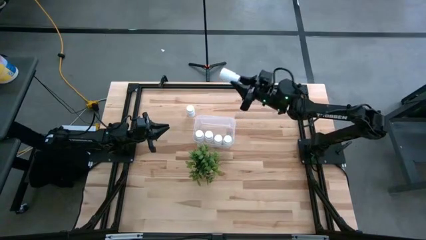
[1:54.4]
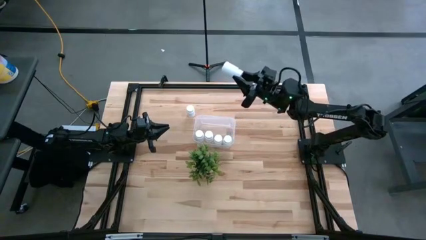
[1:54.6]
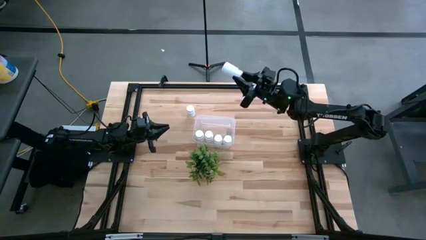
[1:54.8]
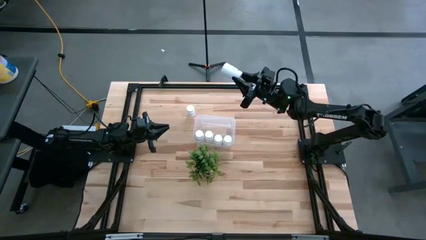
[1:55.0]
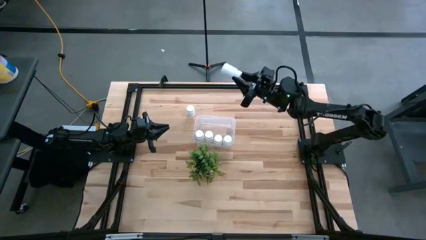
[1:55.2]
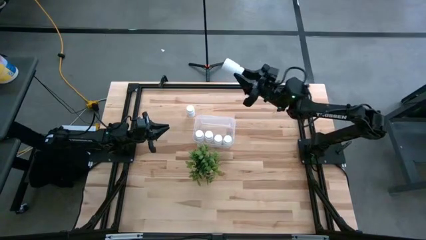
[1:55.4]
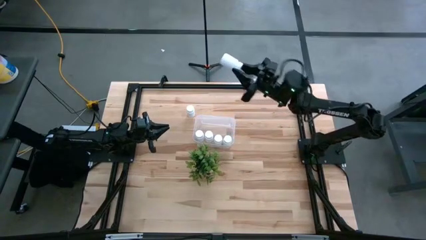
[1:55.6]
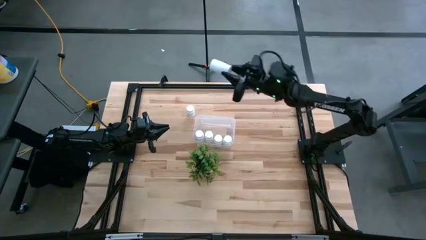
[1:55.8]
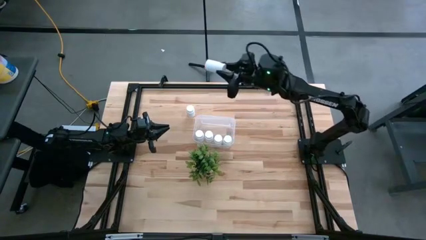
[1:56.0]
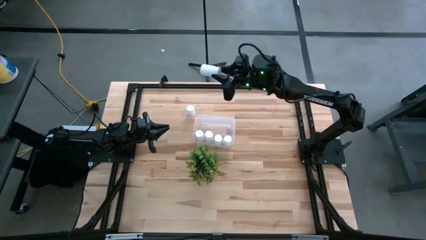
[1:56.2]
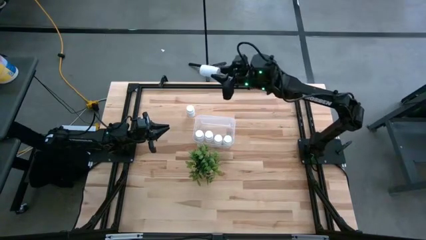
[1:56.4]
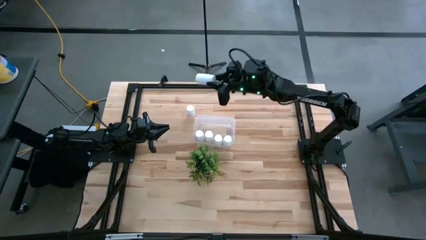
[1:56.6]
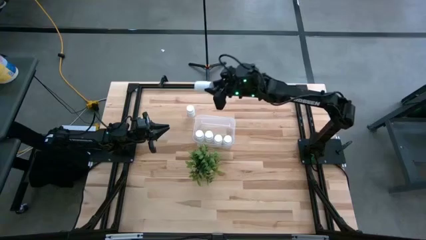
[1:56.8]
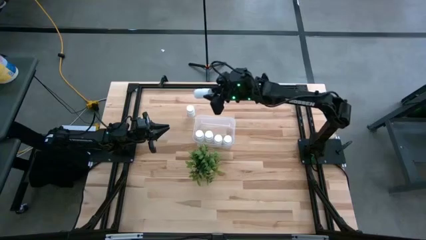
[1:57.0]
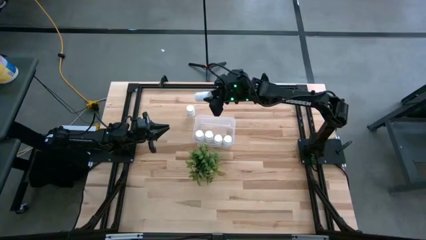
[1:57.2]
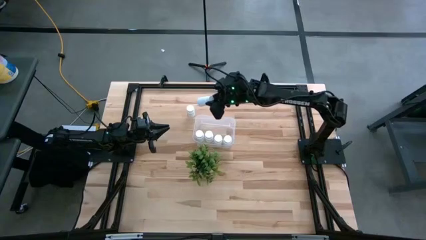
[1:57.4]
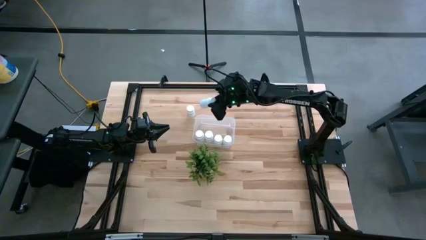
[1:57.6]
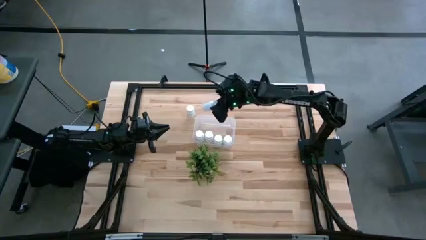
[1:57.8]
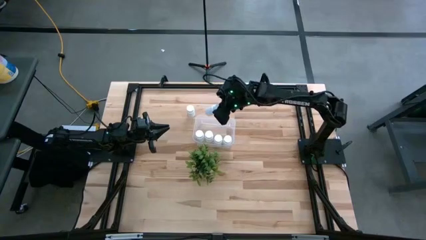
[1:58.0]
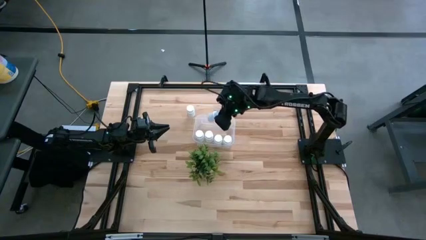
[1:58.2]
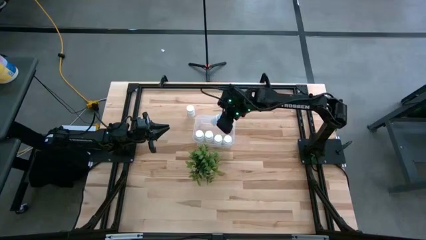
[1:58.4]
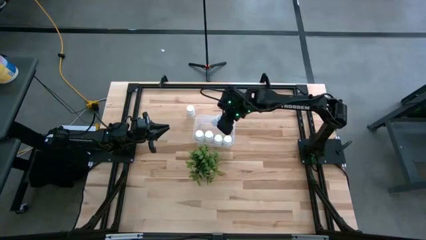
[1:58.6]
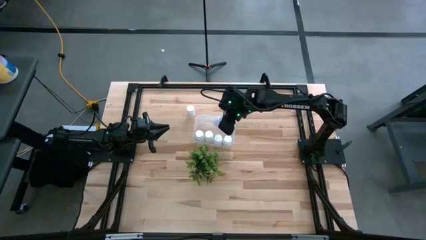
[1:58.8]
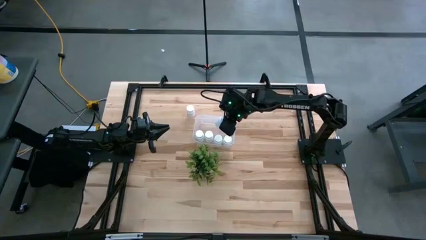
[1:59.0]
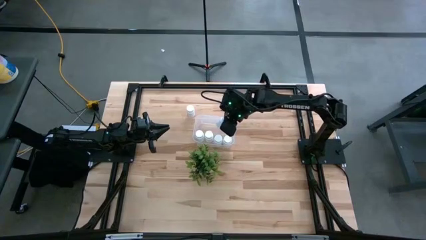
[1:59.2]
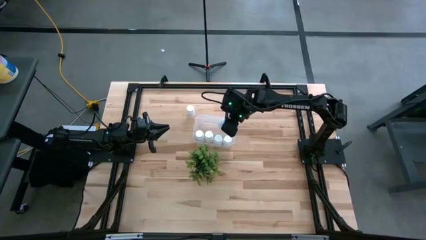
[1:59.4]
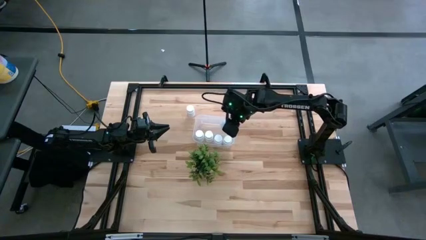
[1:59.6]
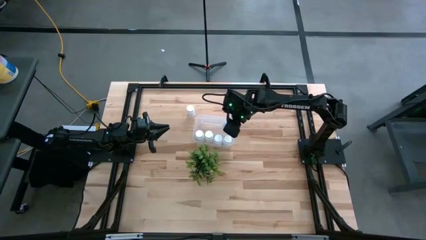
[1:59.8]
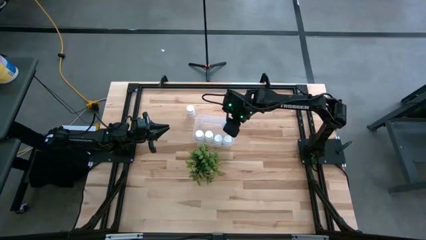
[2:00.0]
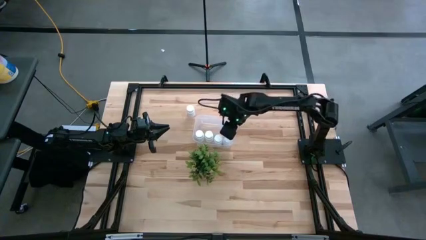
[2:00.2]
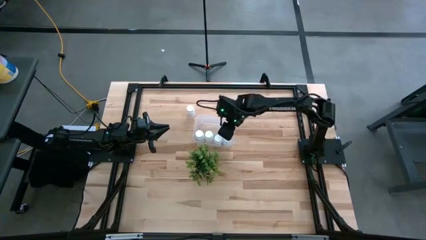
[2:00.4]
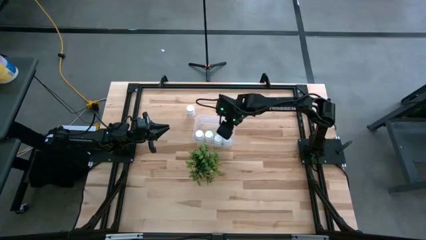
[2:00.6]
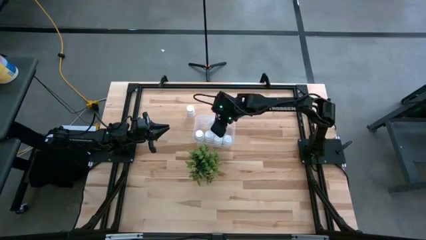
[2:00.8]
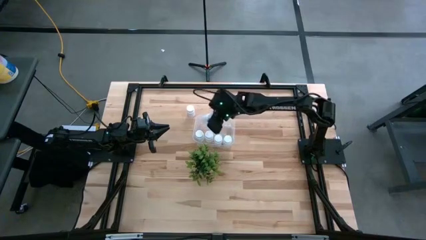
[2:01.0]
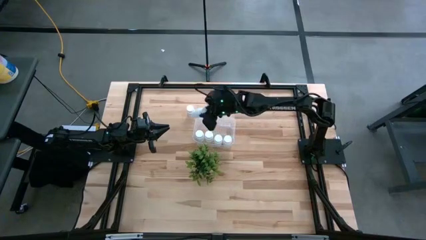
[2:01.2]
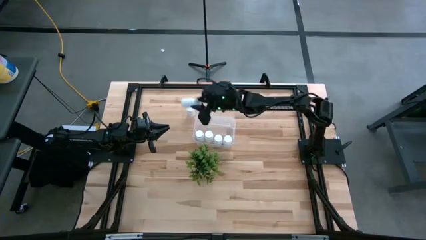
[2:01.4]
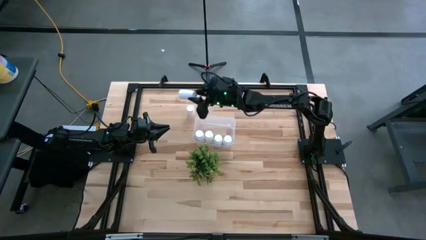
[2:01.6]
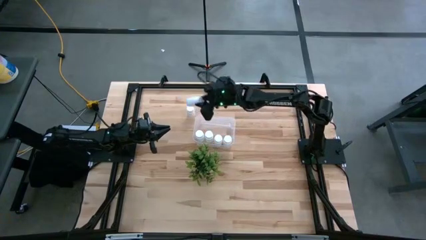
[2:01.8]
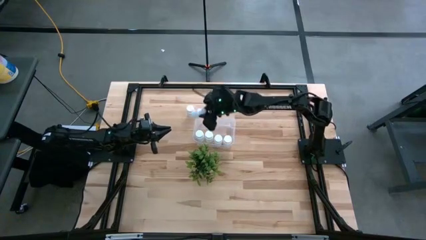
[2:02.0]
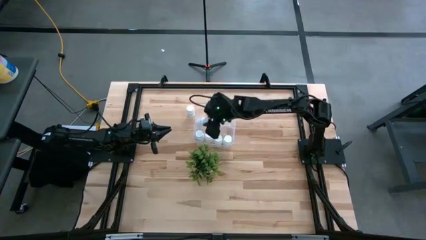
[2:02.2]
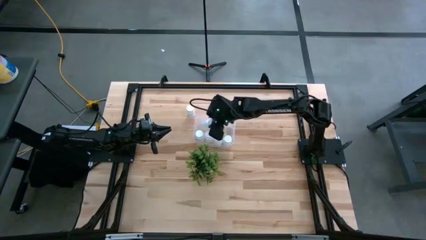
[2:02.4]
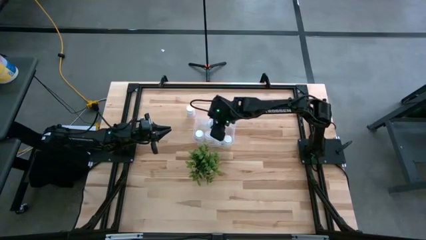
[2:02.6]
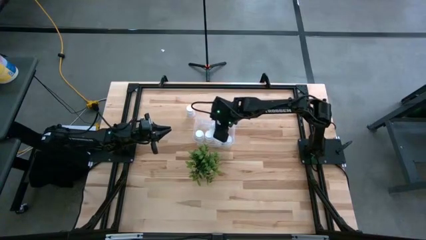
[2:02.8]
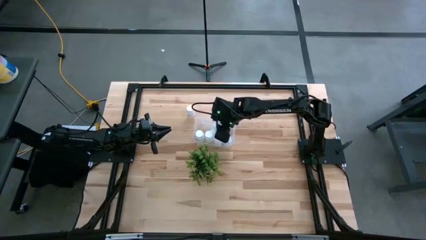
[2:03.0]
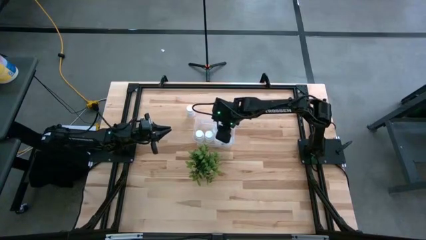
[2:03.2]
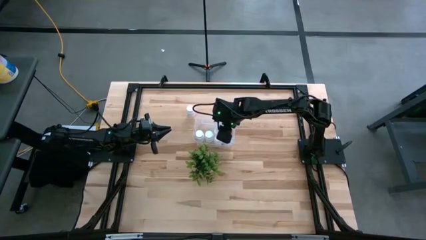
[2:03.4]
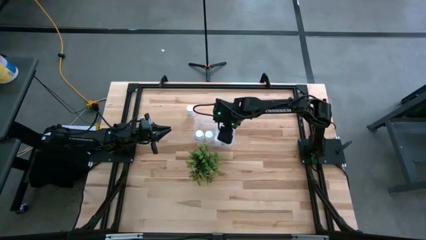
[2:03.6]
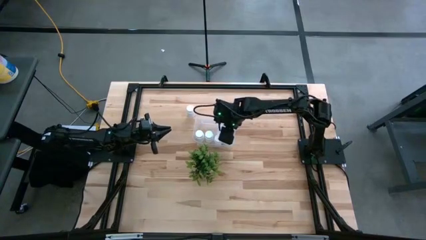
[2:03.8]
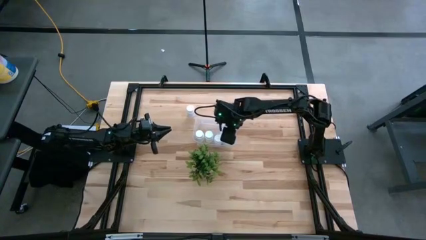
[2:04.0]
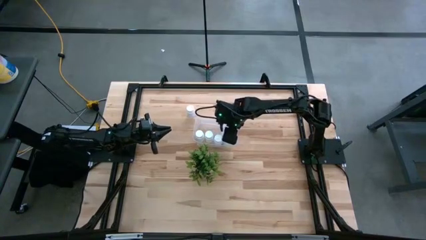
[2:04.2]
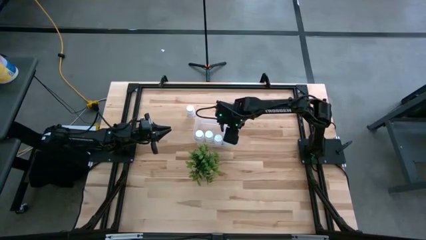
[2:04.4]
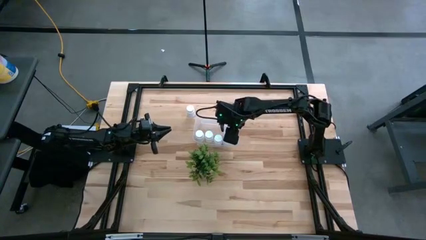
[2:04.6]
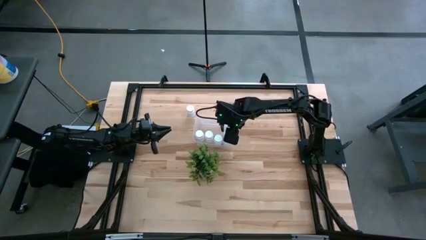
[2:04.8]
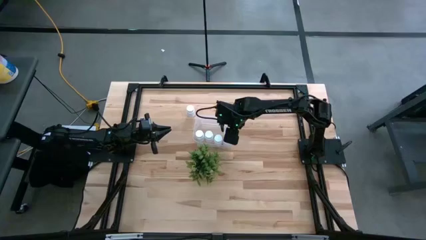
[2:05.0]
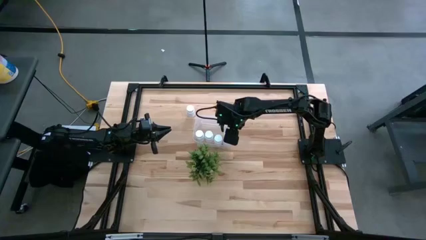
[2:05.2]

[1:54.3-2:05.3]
Task: Pick and place pill bottles into a basket
Put the white pill bottle in the transparent bin
